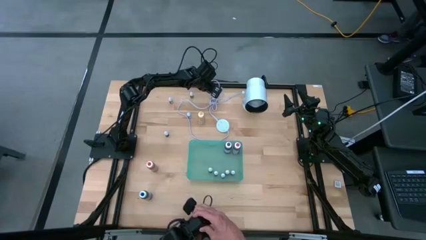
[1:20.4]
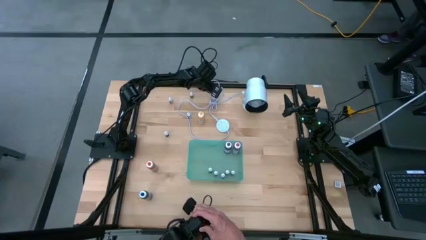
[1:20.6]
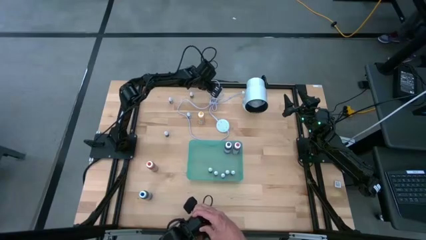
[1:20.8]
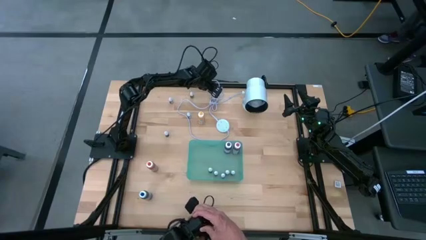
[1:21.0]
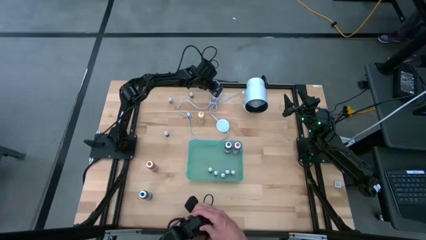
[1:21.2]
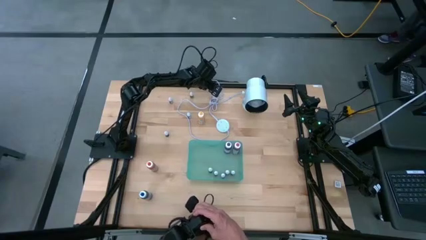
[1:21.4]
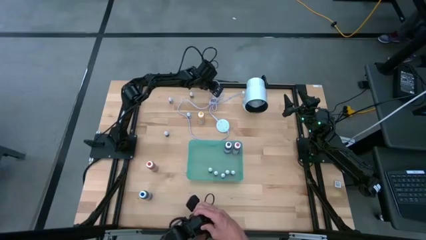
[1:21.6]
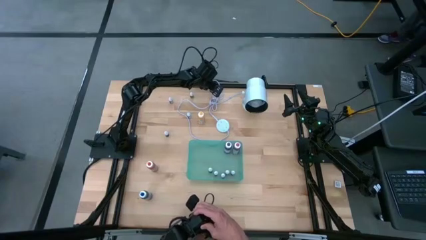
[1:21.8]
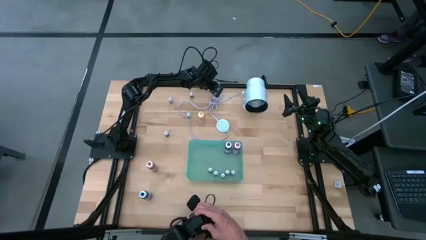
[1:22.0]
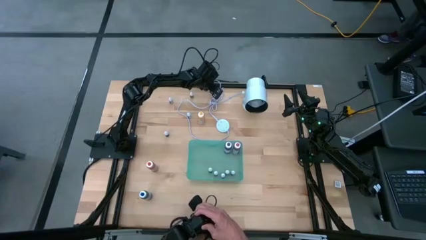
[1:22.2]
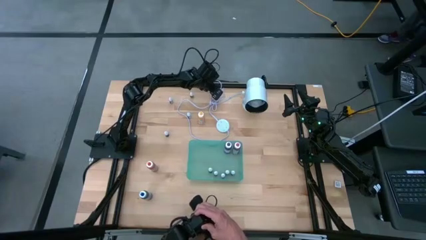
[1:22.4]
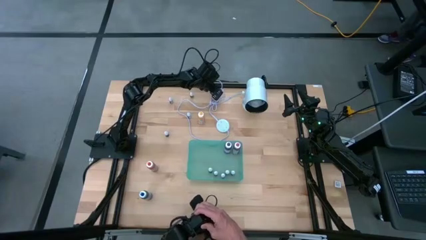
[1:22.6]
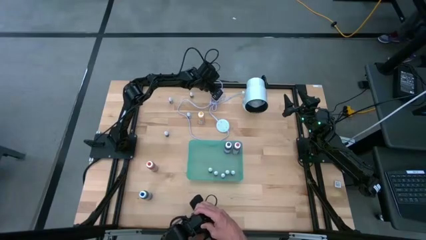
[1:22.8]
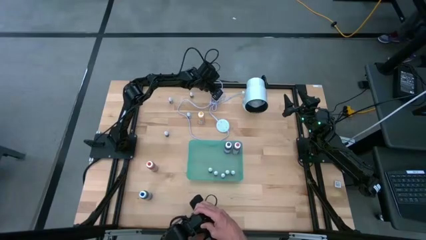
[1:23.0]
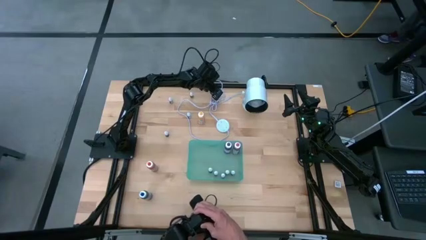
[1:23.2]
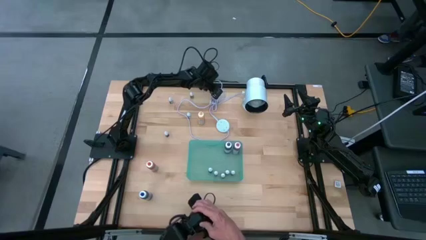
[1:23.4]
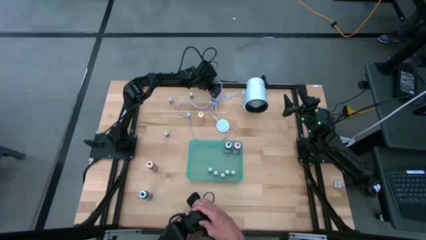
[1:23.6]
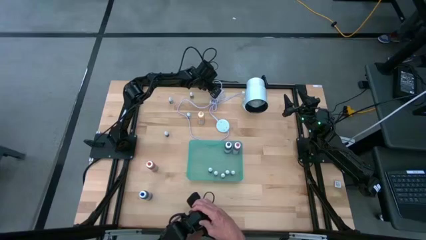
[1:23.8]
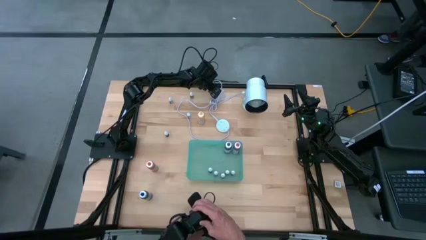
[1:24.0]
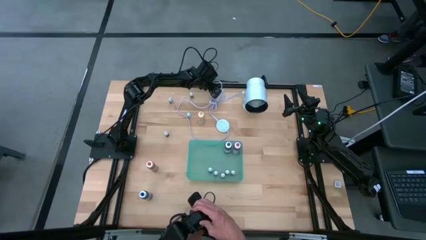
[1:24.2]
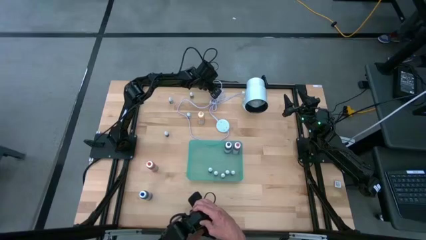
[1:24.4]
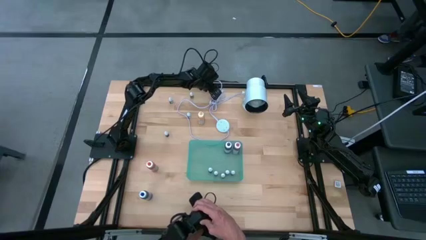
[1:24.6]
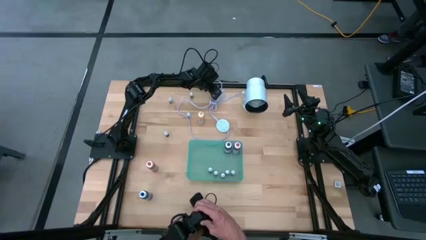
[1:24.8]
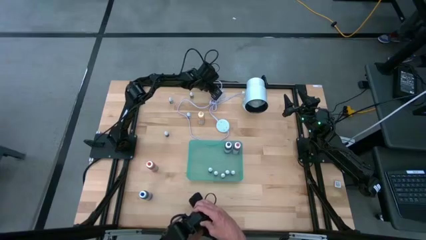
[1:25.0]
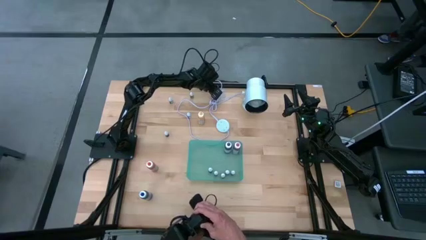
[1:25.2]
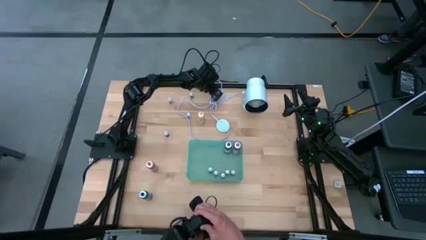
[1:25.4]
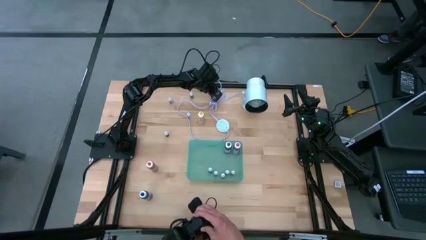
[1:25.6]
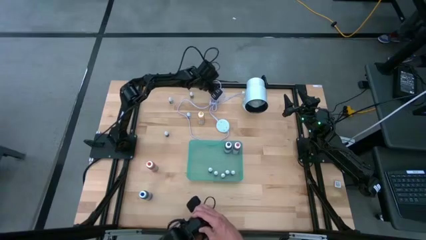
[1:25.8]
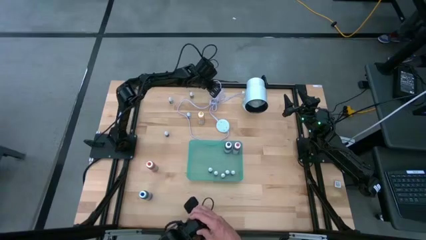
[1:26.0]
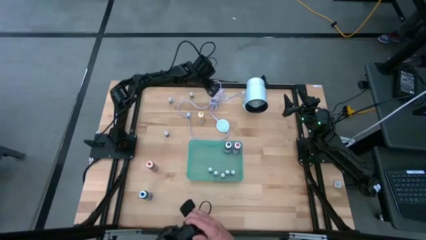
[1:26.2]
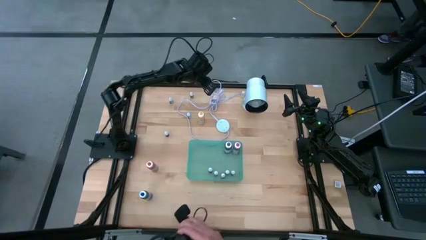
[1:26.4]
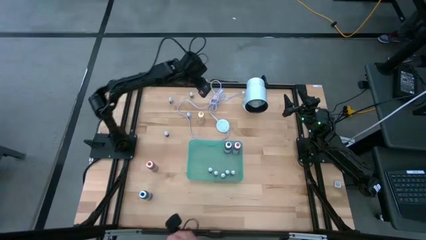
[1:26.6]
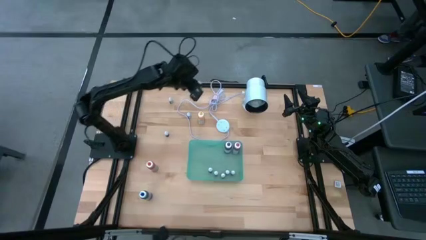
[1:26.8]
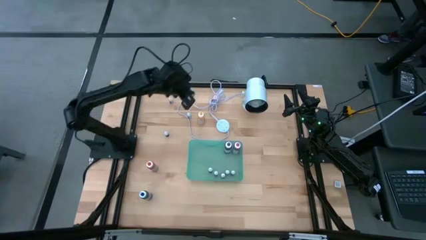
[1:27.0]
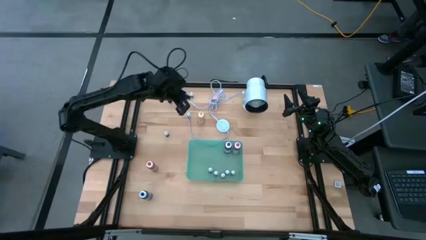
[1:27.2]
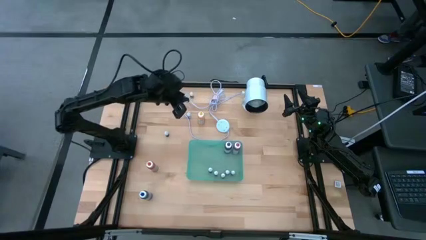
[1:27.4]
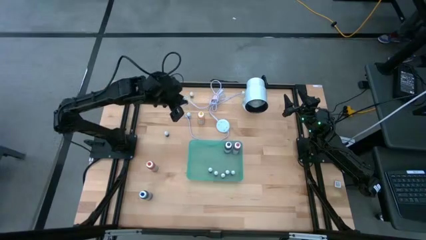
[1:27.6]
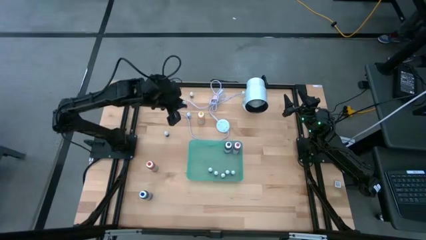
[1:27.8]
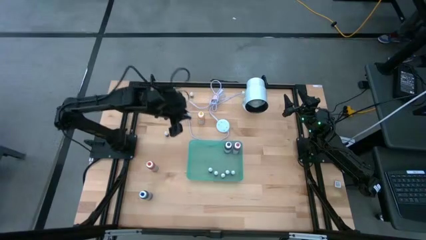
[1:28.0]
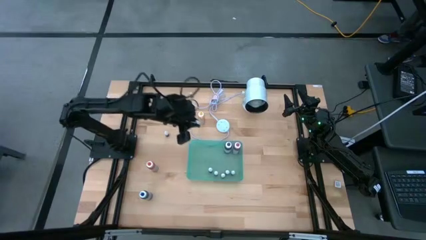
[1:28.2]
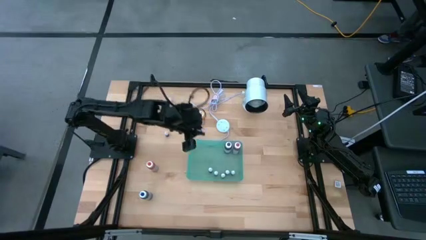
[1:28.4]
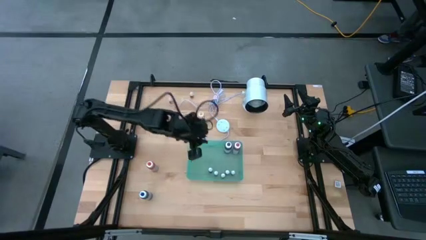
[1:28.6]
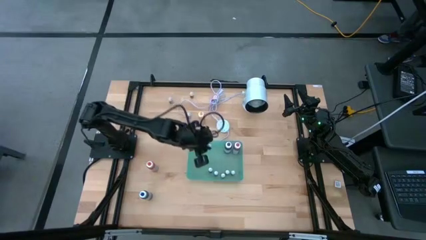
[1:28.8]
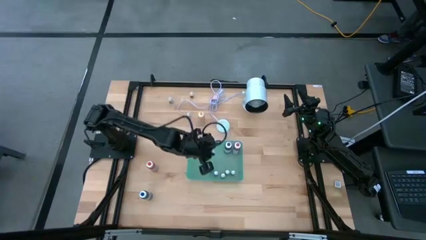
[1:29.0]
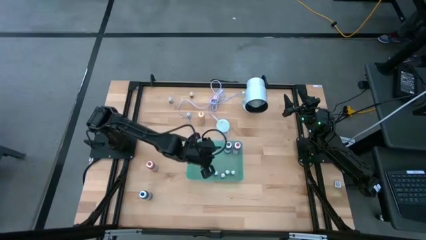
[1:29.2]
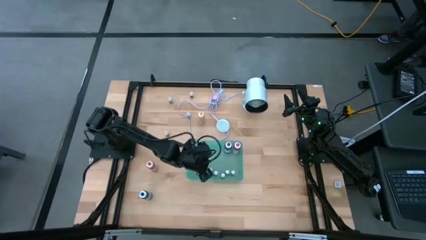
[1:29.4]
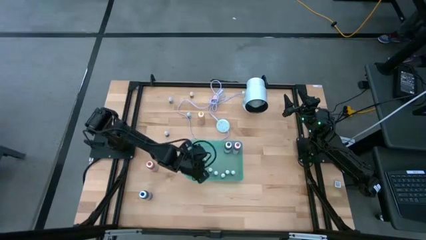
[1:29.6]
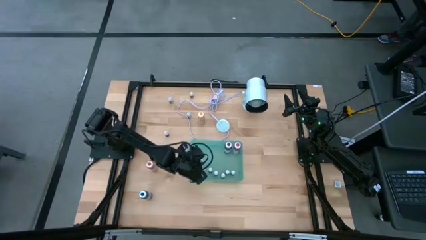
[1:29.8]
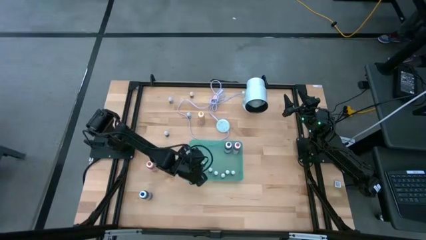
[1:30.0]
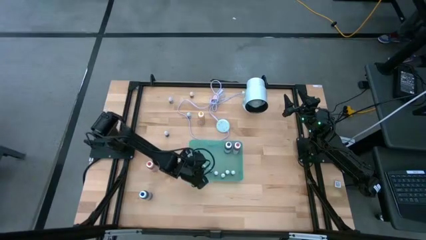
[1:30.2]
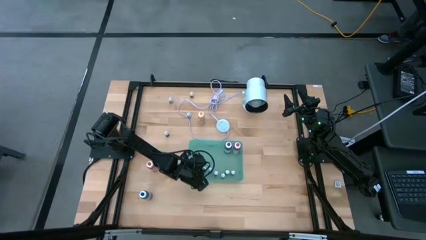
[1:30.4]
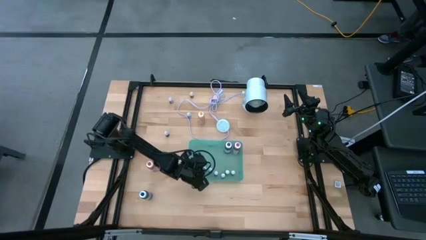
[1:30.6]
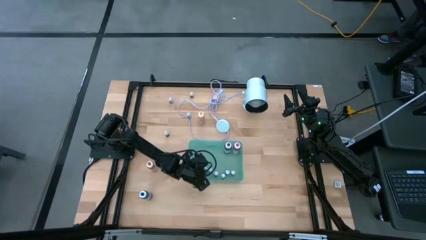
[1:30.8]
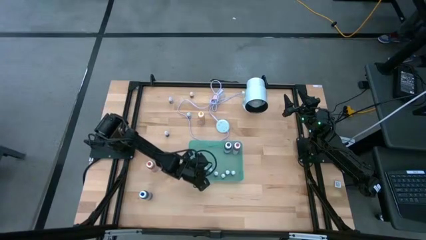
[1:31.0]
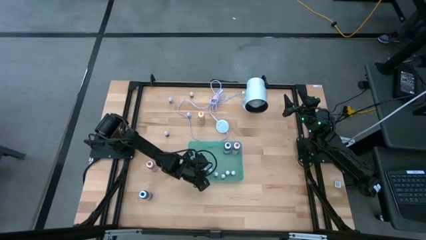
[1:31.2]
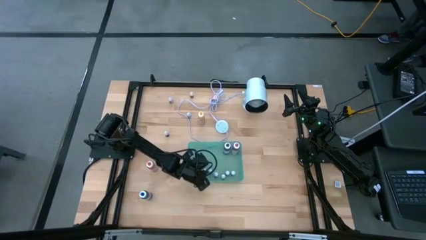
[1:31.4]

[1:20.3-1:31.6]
Task: Pick & Place food coloring
Put the top small blue food coloring bottle into the bin

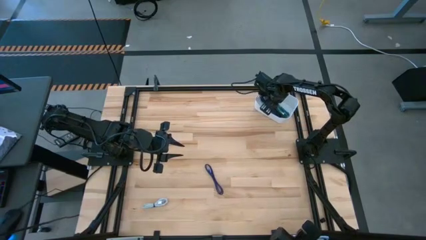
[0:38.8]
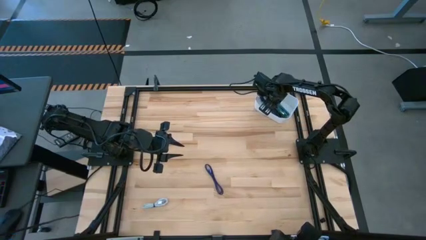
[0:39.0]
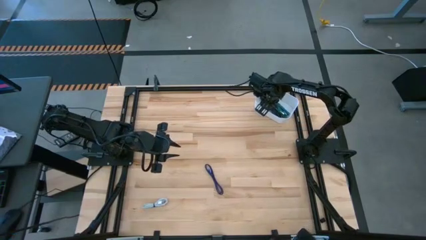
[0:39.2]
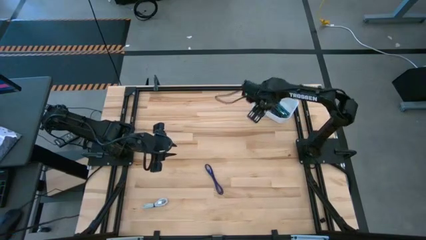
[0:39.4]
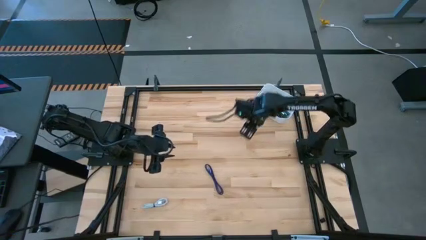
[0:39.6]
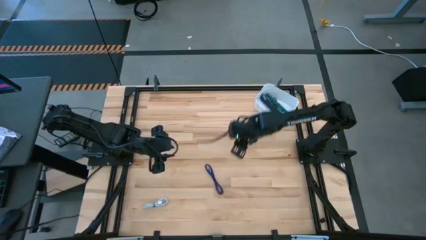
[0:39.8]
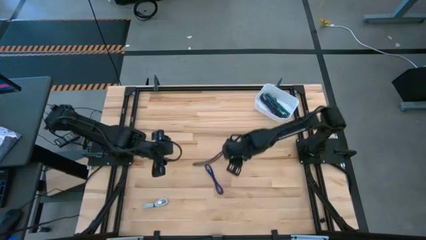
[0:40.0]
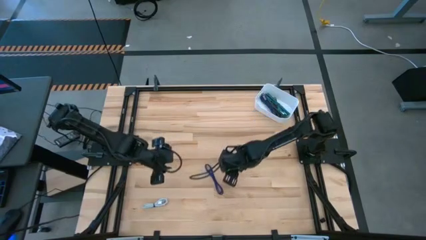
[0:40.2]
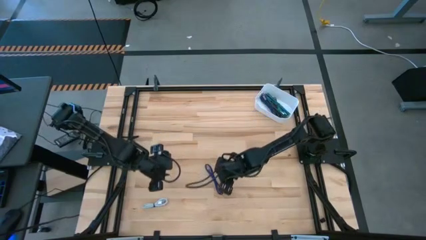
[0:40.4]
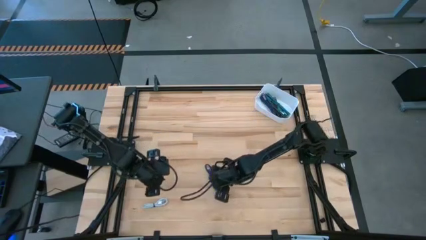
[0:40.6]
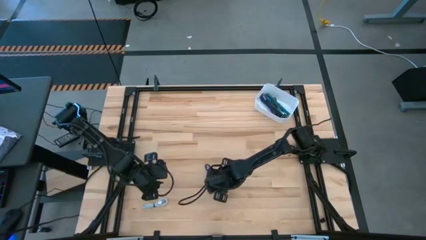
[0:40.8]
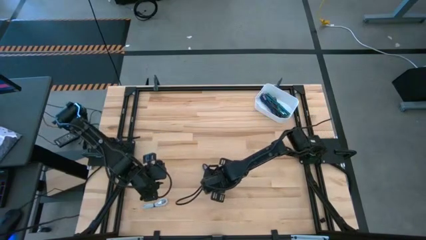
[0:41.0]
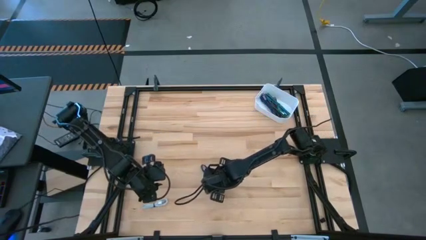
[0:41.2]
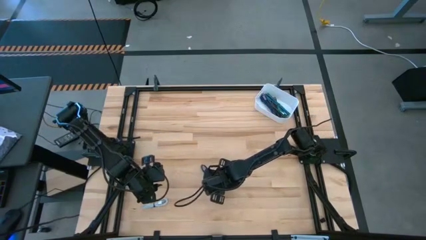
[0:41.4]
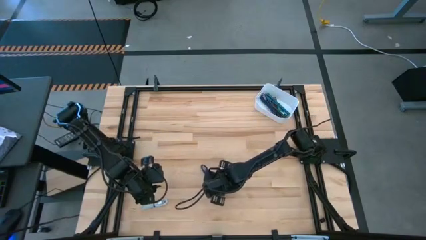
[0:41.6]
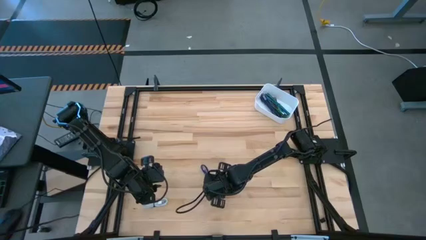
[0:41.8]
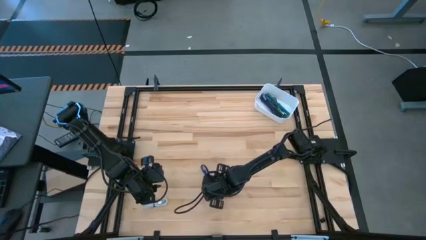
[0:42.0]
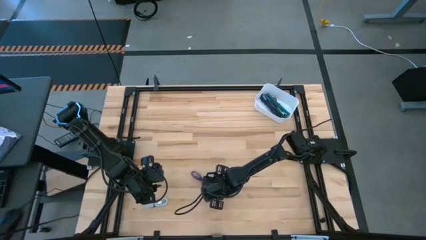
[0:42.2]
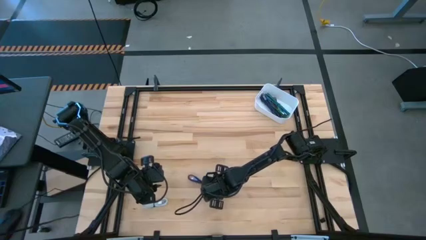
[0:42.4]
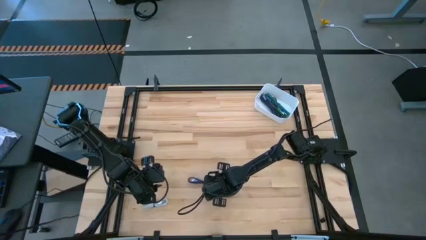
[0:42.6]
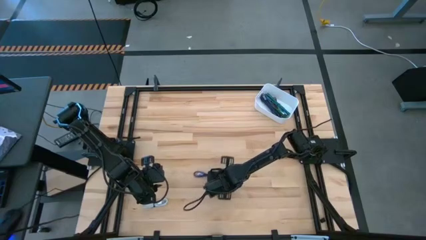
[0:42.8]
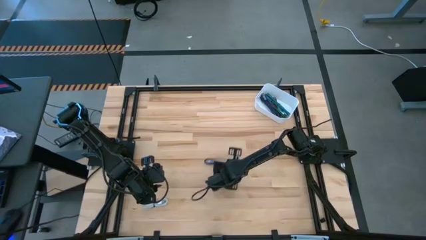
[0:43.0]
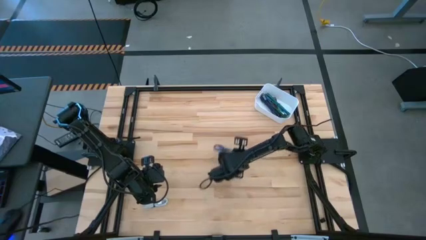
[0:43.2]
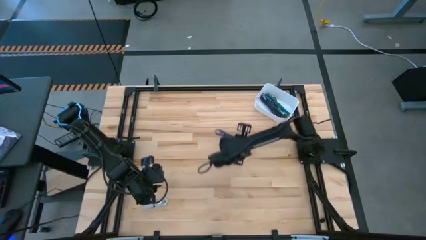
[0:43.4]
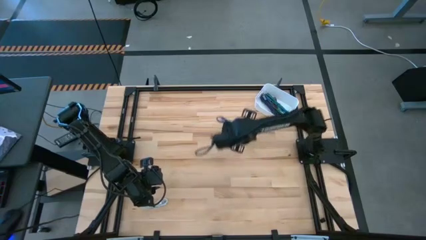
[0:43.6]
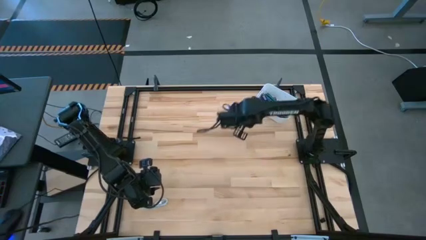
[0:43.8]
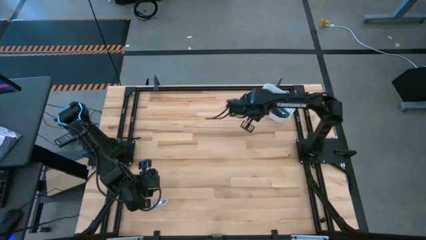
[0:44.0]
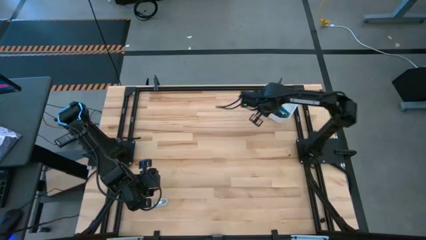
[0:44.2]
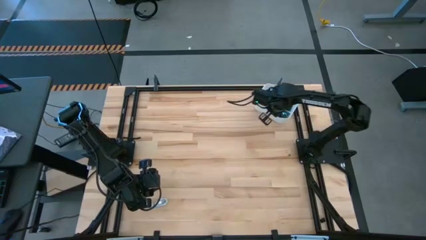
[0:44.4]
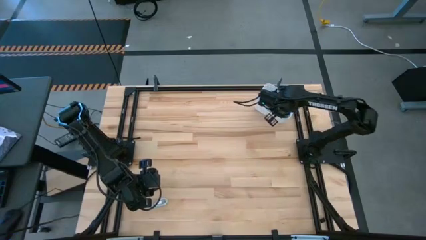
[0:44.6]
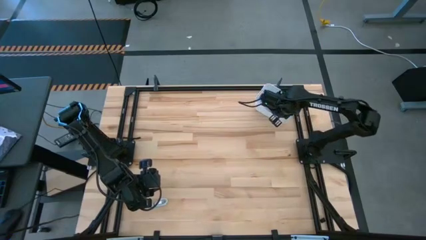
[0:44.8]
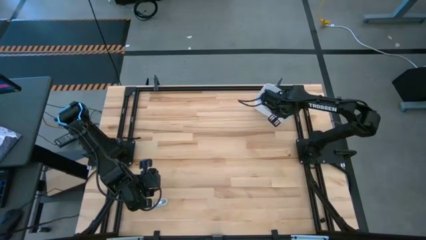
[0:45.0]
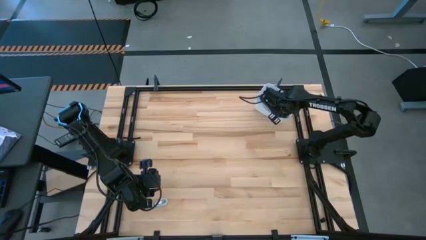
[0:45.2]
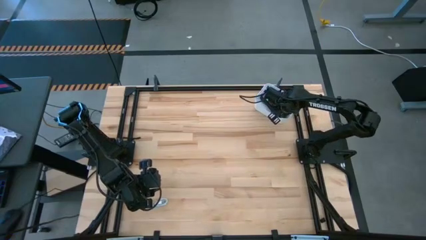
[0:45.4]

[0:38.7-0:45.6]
Task: Pick and place USB-C Cables
Put the blue charger cable into the white bin
